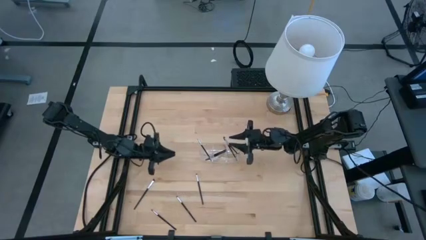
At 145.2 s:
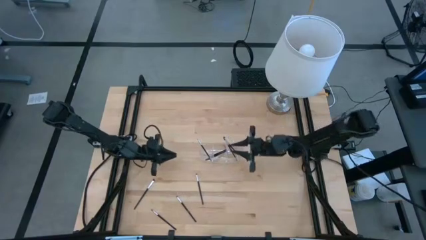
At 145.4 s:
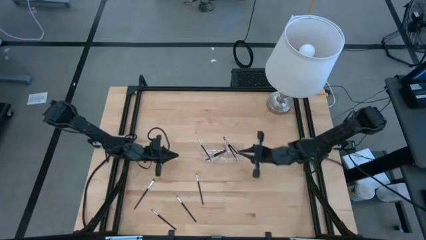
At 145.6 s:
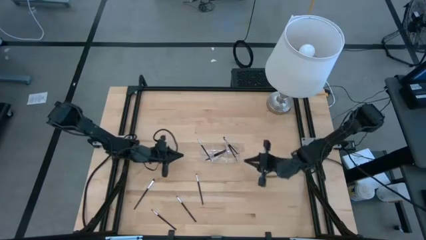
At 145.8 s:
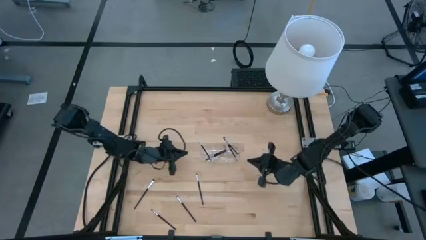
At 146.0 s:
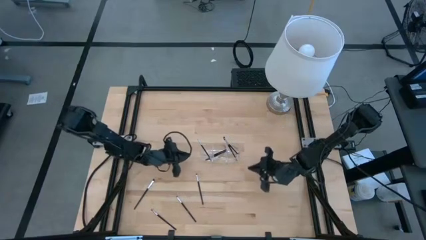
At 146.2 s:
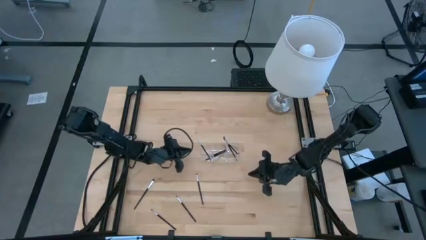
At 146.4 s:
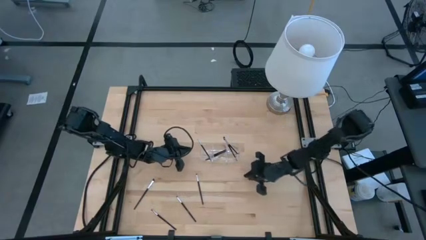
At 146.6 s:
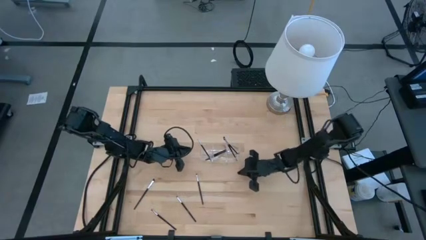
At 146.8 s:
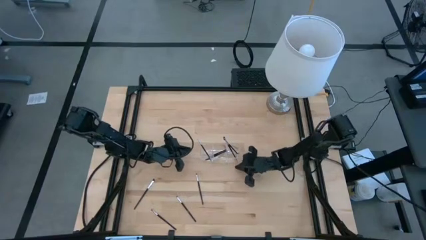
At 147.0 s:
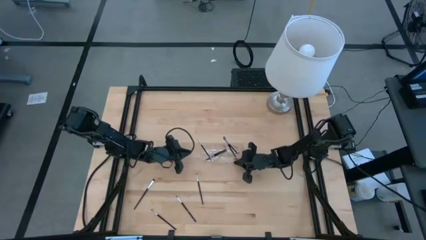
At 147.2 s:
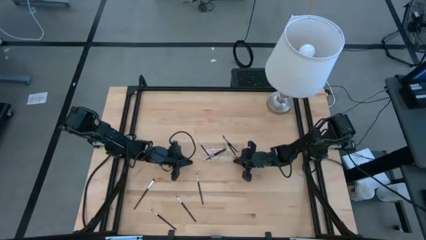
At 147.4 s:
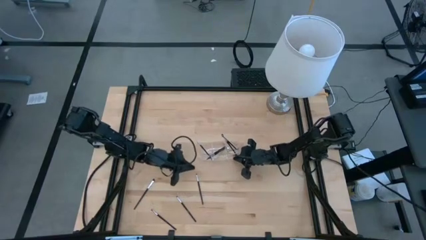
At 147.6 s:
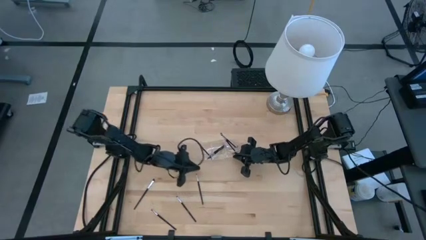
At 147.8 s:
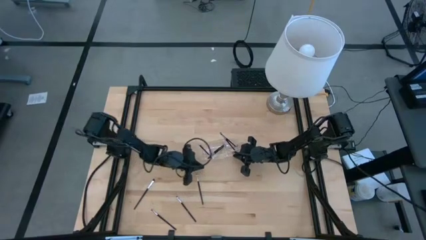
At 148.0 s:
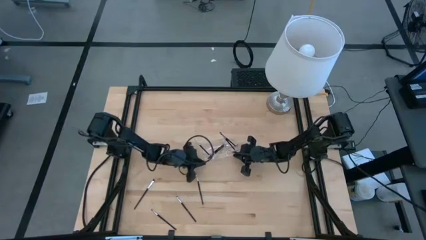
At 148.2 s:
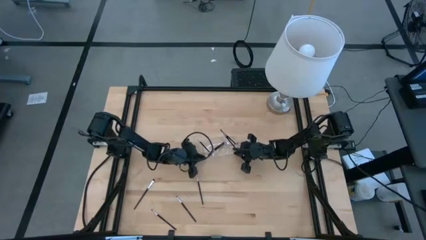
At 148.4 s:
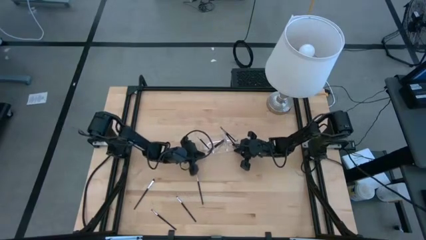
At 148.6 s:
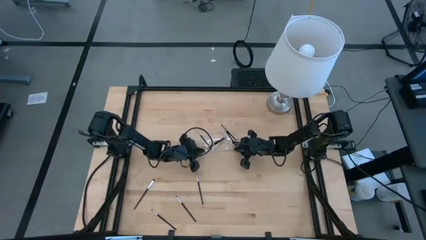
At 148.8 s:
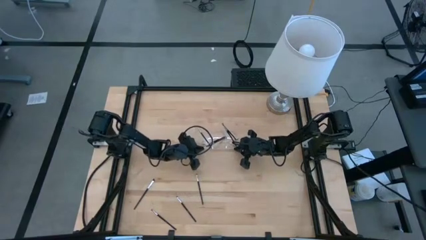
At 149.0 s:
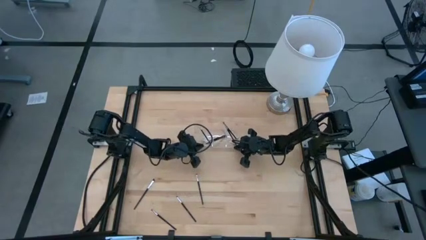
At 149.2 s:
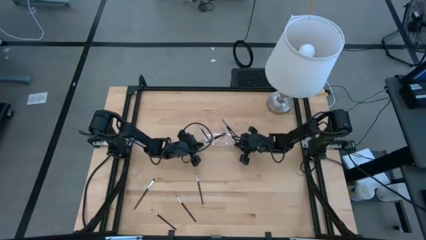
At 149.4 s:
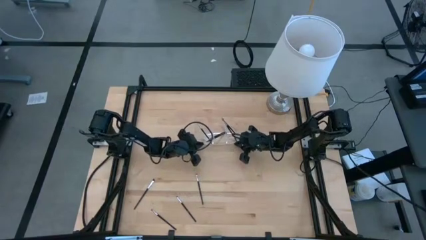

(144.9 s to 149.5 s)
Task: Pick & Place Makeup Supplies
Adjust the transparent organizer

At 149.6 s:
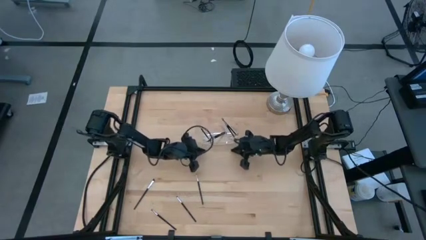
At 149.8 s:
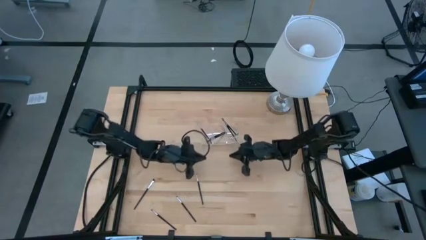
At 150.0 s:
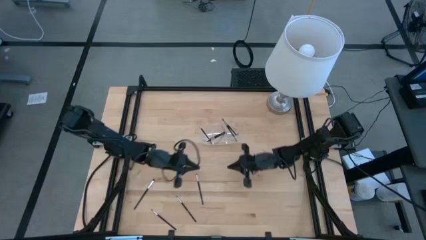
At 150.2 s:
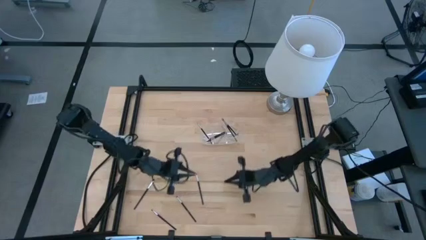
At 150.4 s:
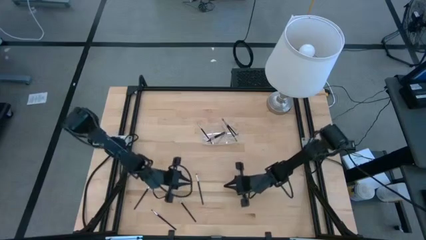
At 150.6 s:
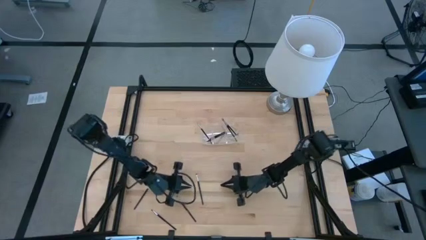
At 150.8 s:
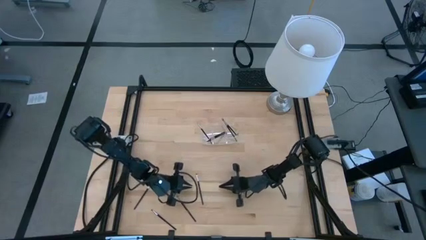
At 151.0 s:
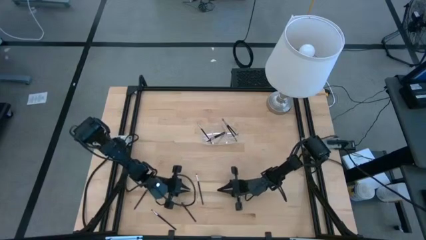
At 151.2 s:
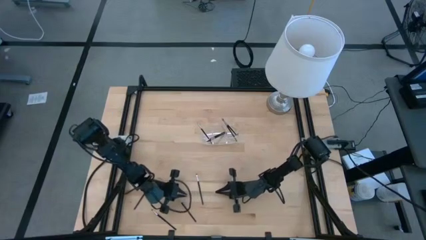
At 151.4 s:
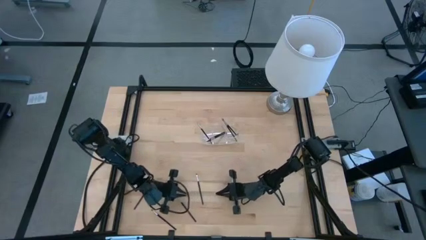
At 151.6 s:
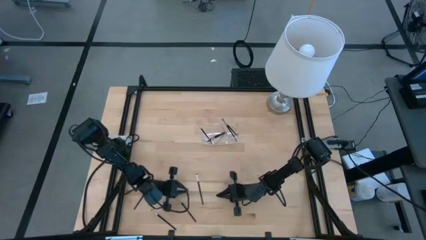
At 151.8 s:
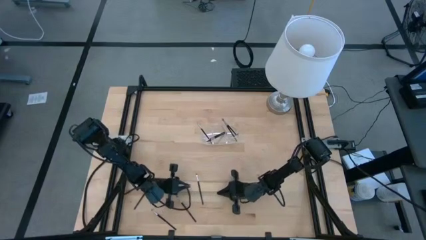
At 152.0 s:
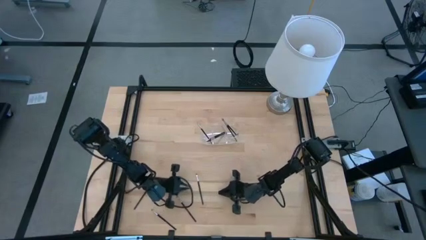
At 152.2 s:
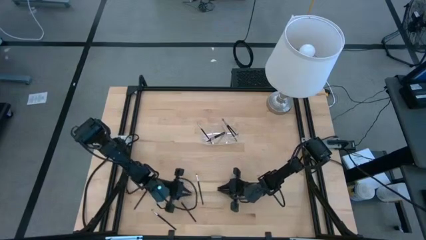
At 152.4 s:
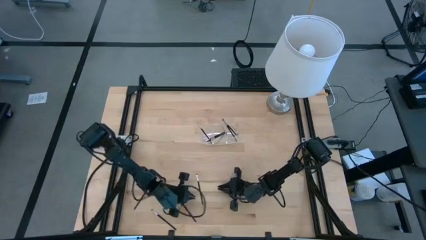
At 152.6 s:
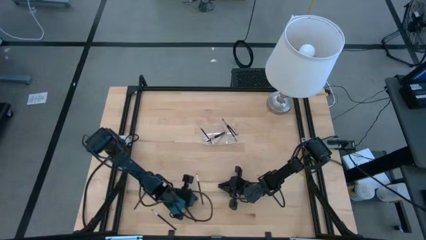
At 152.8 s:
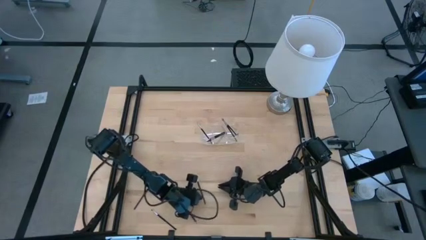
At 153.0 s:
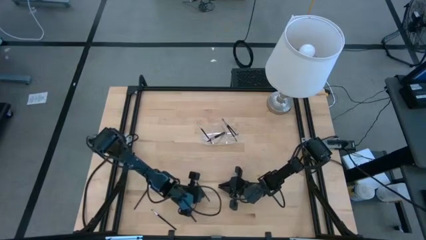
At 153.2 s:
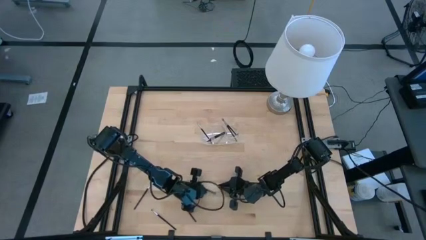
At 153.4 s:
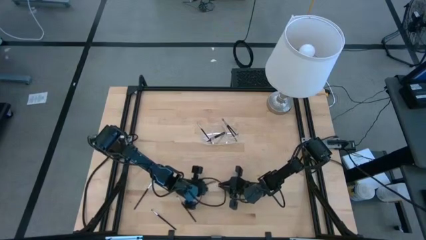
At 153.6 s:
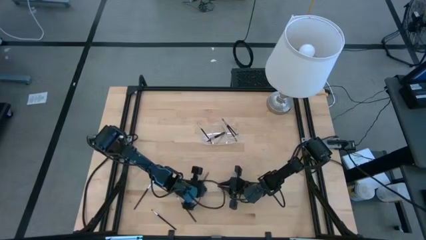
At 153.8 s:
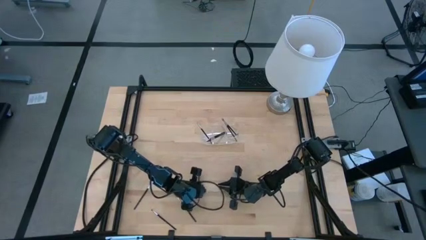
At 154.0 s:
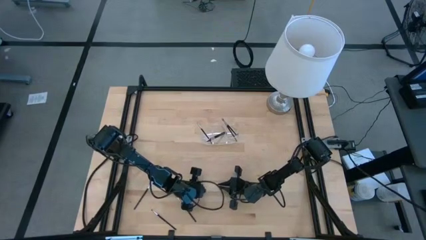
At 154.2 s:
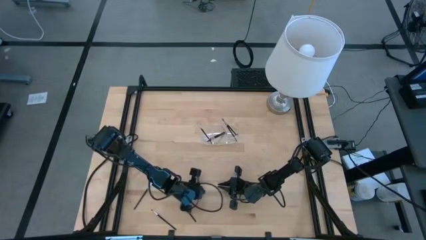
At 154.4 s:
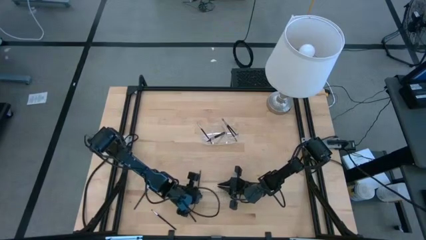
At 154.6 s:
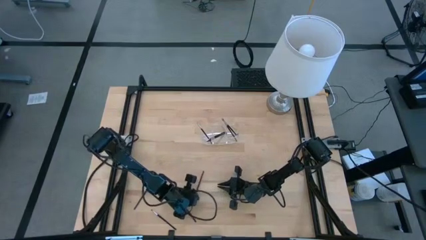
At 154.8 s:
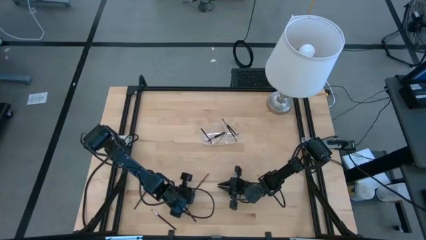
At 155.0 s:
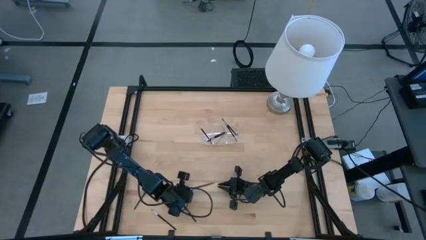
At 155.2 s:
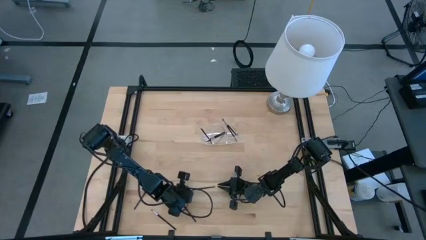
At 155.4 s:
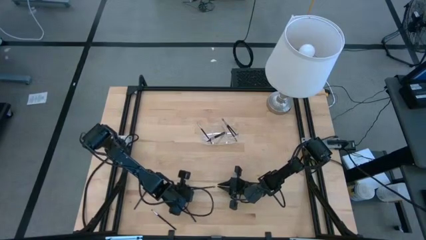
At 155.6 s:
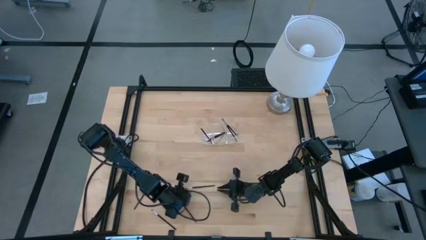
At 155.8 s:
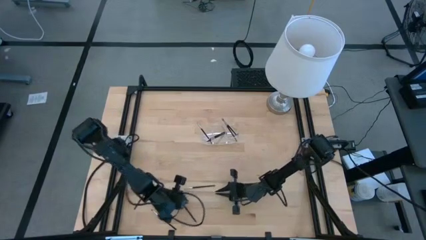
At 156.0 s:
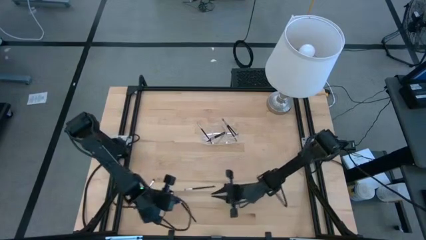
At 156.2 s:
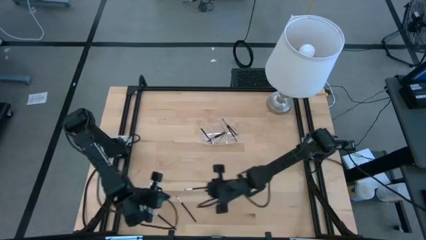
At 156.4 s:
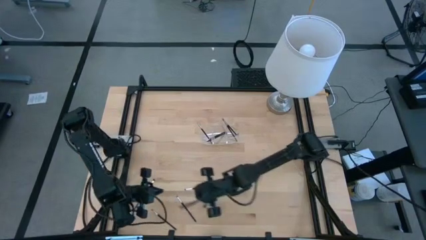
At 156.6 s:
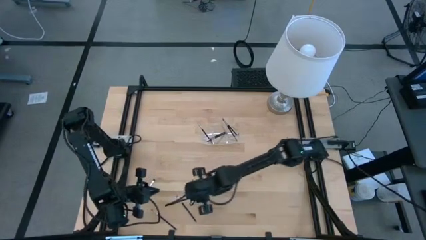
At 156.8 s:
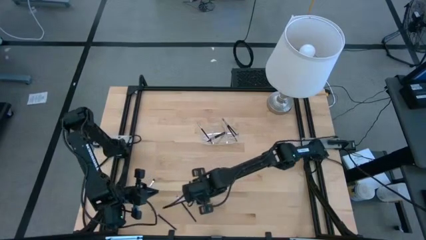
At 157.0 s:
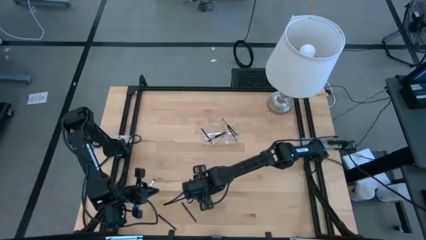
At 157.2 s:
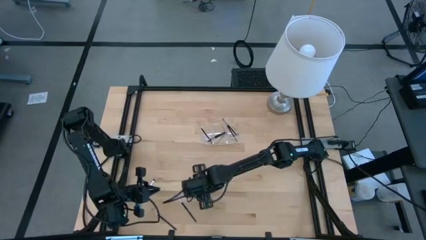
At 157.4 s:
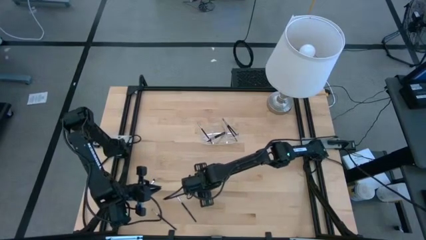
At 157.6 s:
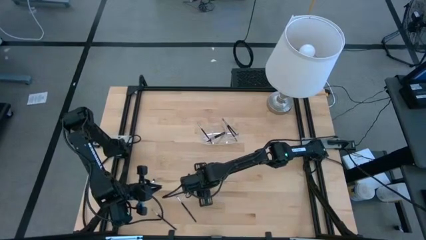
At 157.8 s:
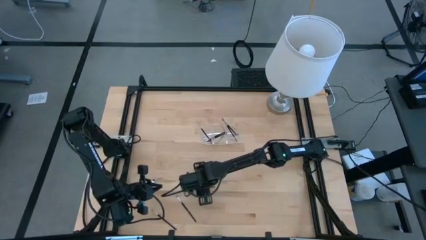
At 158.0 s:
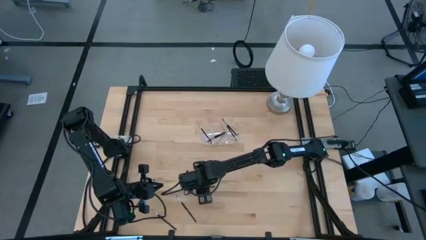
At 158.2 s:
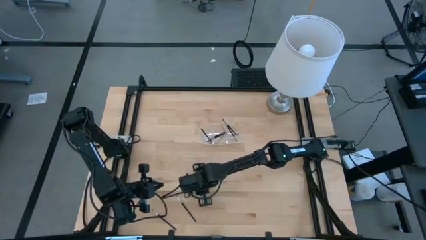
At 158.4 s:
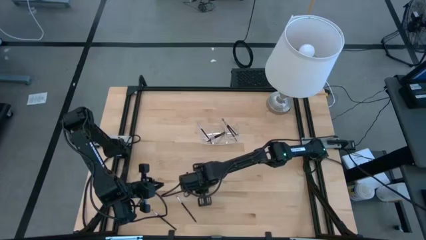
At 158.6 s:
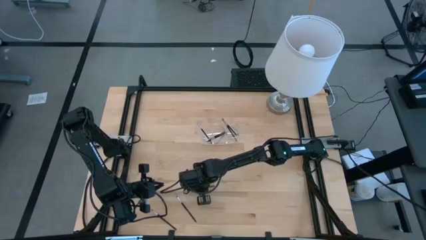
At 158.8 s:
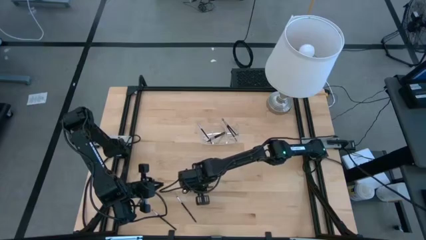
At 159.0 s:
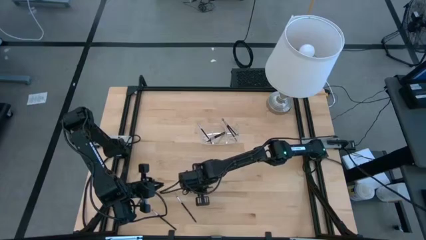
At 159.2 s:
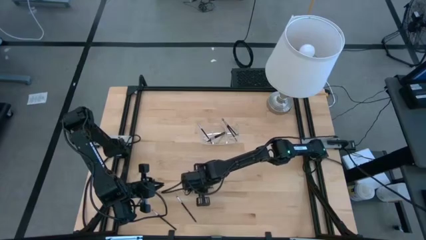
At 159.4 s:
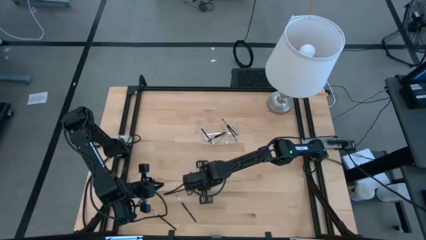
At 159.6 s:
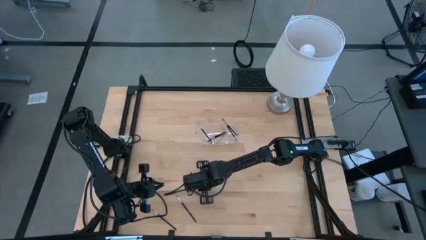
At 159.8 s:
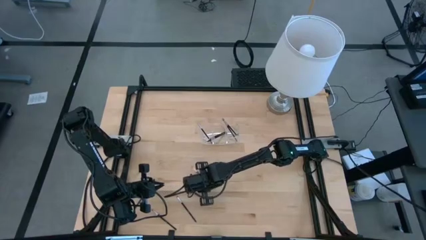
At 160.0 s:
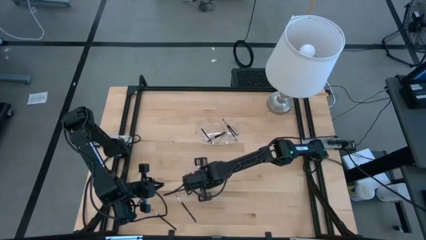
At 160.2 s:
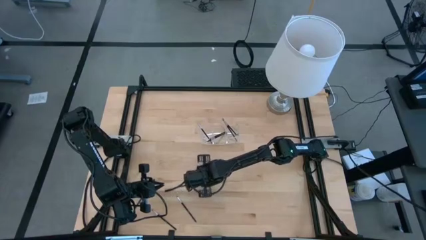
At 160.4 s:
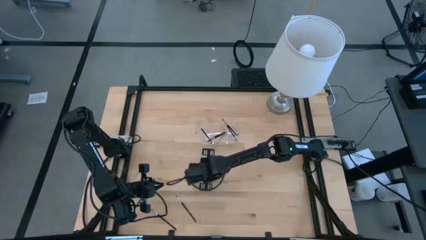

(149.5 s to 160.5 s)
Put the makeup brush into the transparent organizer
